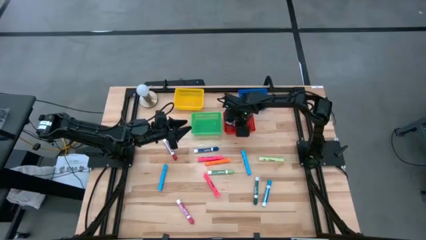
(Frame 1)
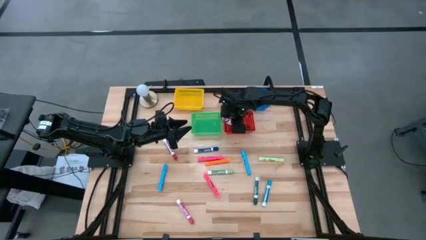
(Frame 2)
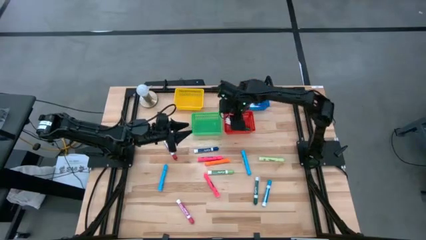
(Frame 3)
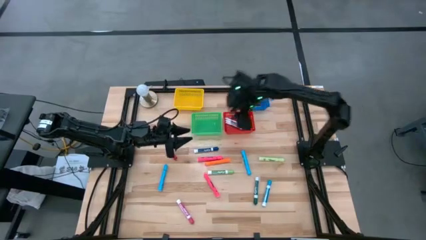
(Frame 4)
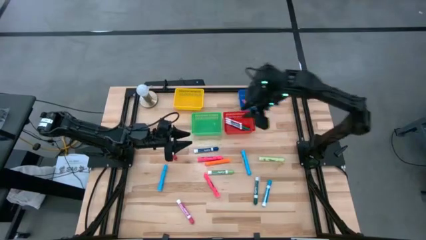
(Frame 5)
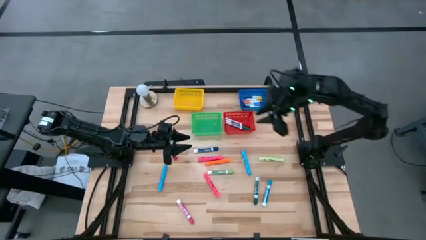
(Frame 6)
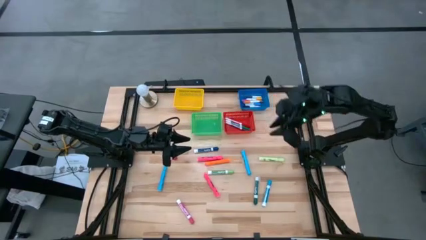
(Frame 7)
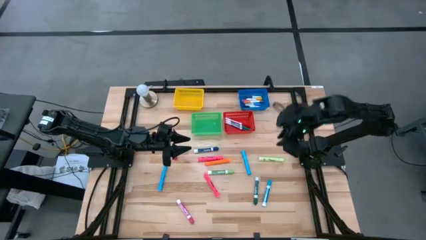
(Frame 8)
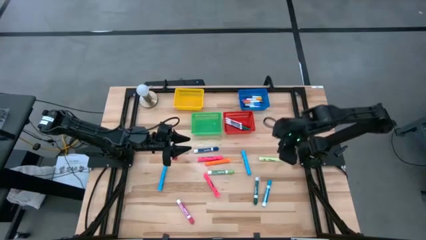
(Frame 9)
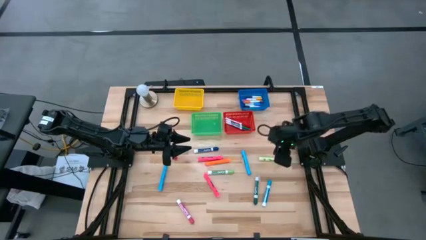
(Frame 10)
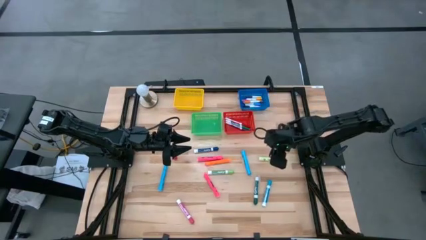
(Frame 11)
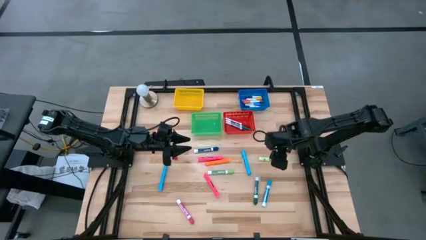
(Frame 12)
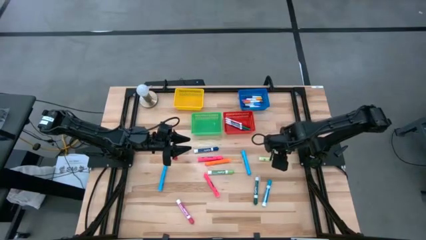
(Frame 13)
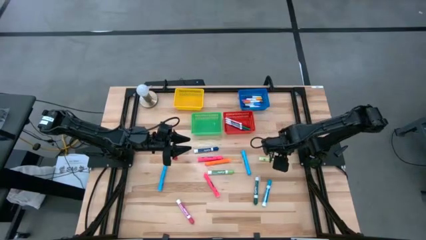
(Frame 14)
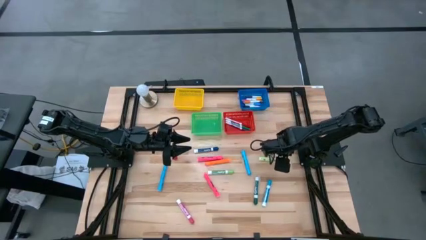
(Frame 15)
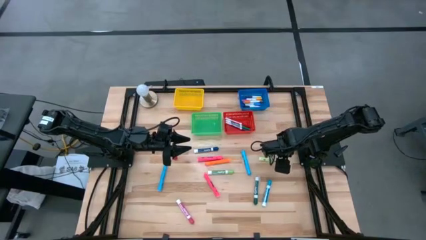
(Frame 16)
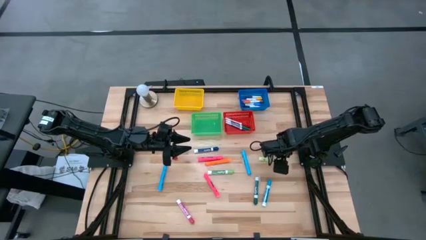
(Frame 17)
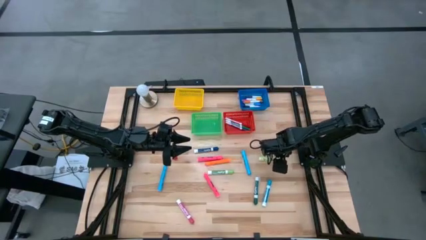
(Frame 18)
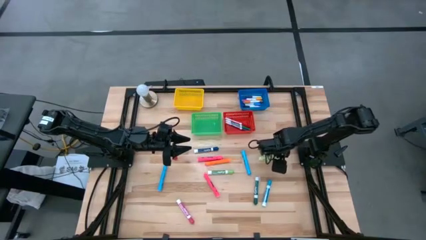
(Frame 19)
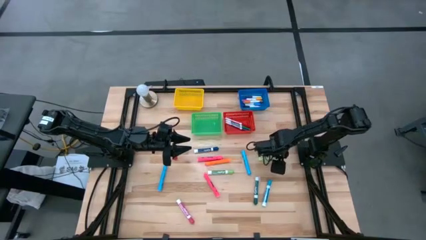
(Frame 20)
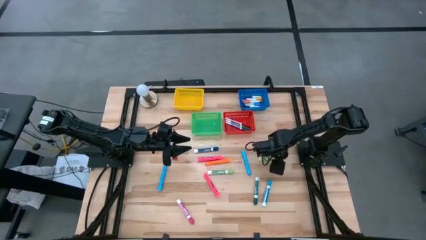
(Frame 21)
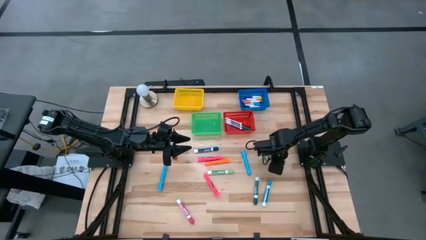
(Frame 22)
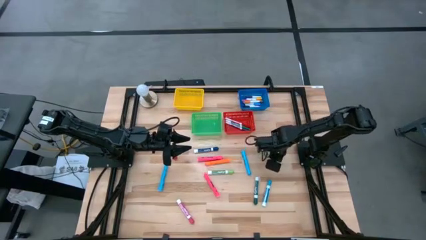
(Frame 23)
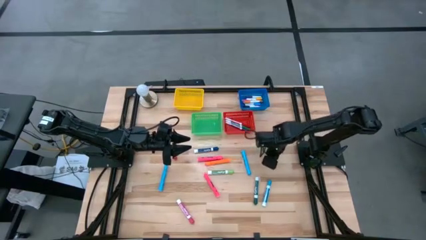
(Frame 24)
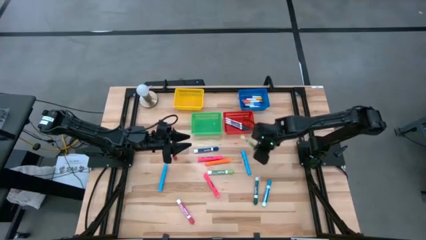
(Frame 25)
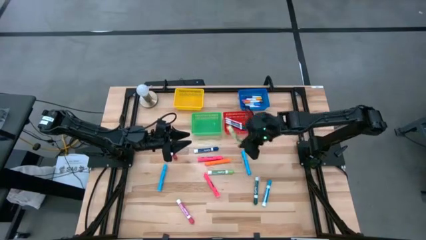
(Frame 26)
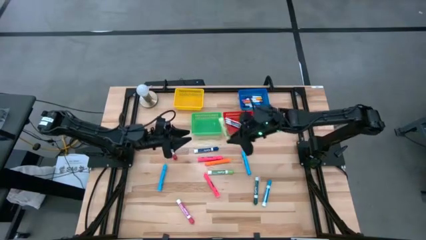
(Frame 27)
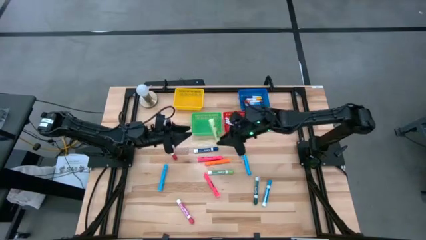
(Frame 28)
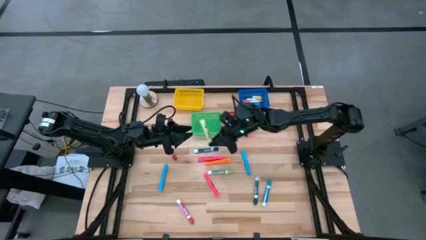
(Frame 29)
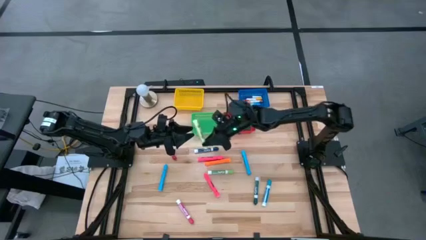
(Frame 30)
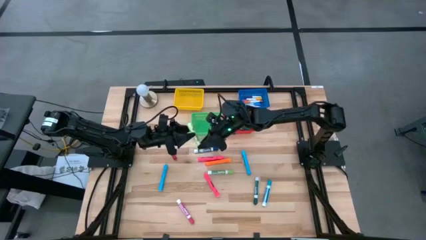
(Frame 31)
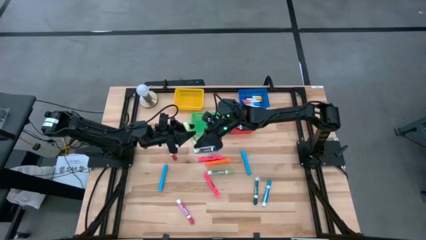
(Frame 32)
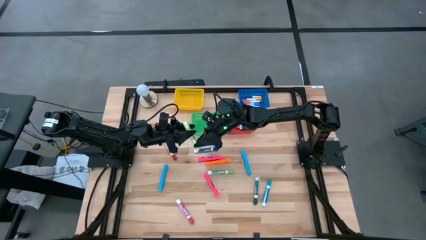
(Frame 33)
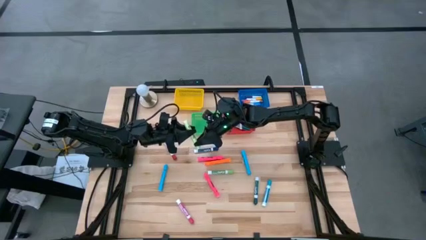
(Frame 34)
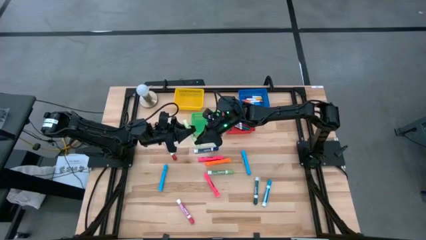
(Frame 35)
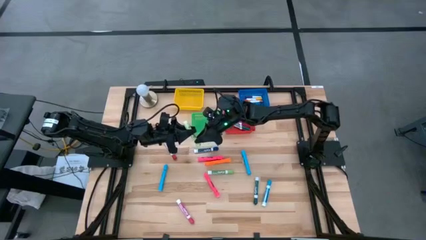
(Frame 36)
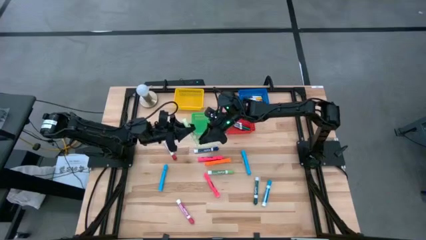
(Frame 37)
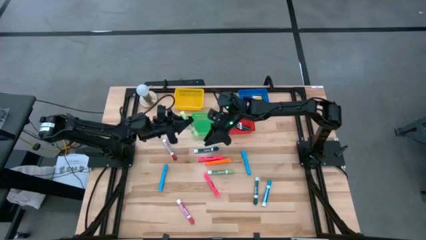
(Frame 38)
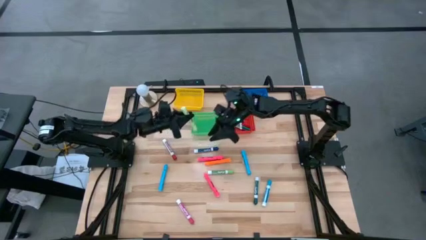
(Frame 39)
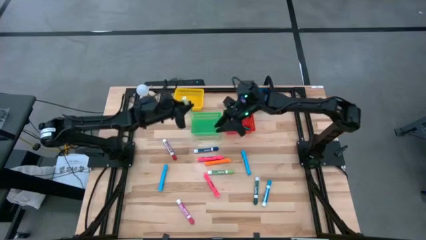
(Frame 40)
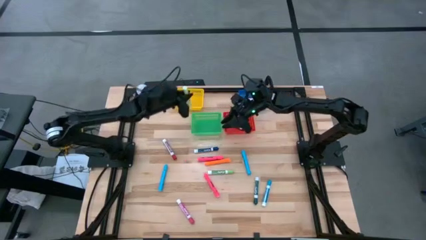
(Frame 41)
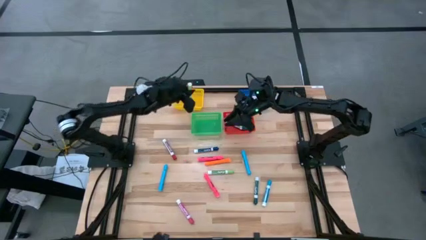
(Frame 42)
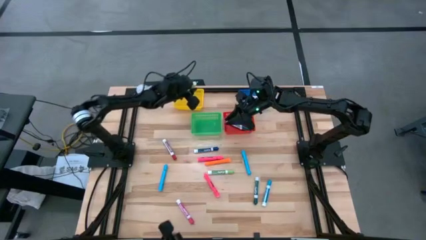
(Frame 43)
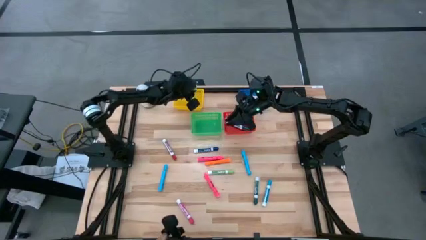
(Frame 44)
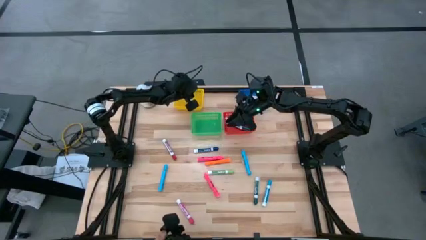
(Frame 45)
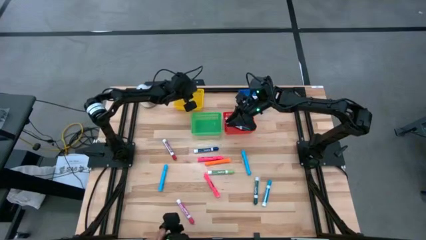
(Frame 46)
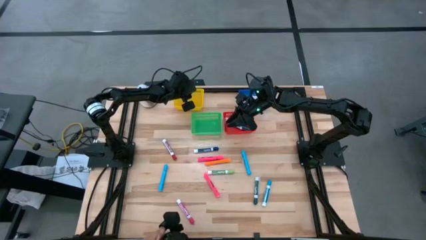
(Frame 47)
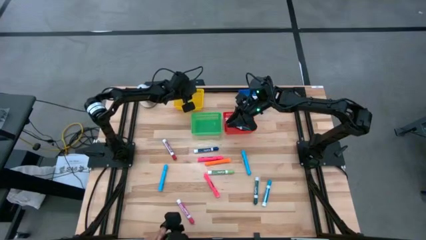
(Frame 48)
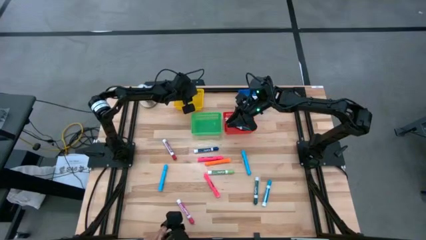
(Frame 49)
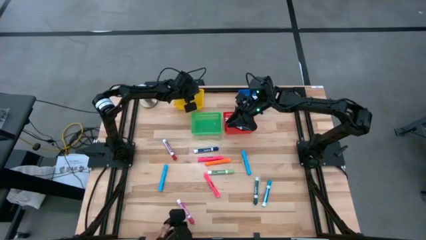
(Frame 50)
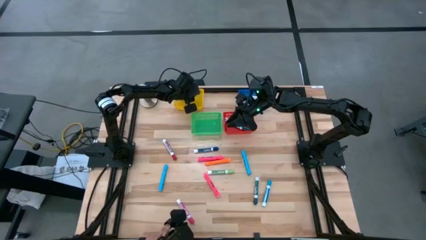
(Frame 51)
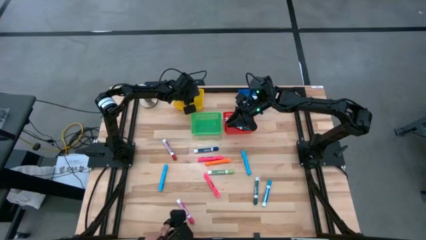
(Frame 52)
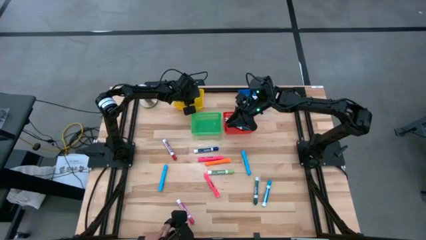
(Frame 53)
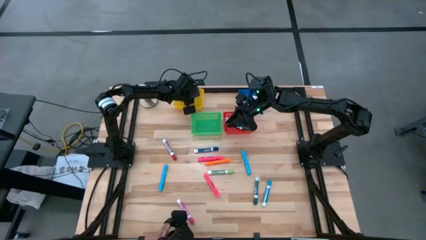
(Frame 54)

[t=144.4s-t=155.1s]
Task: Pick & Place Markers
Put the light green highlighter into the yellow bin

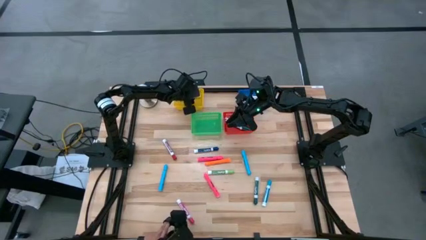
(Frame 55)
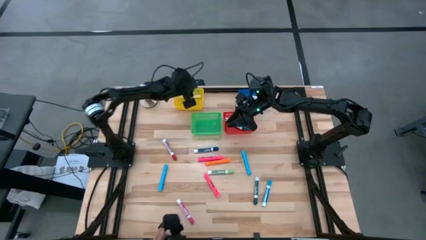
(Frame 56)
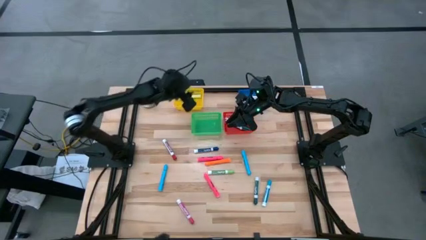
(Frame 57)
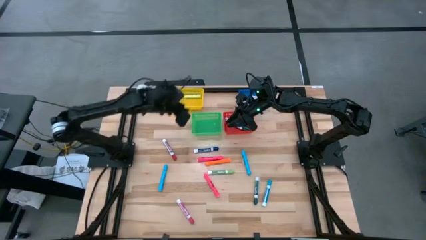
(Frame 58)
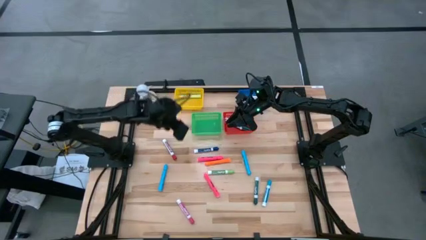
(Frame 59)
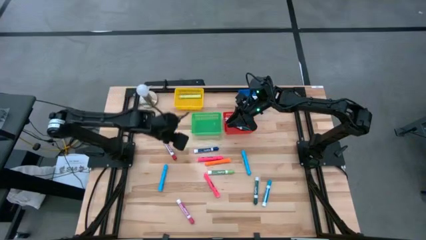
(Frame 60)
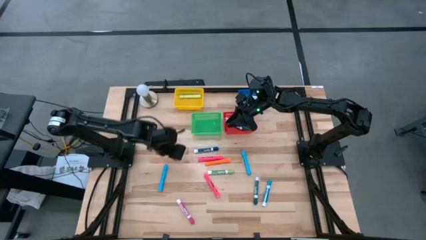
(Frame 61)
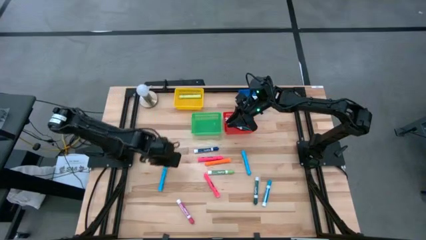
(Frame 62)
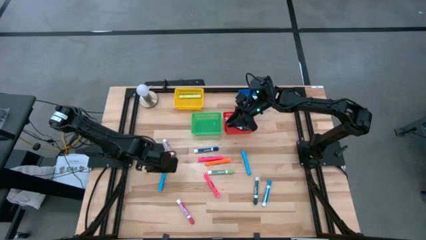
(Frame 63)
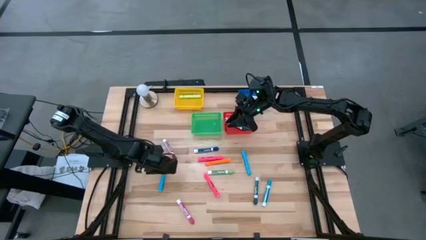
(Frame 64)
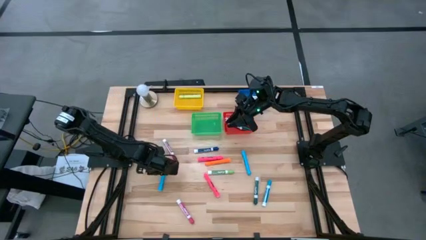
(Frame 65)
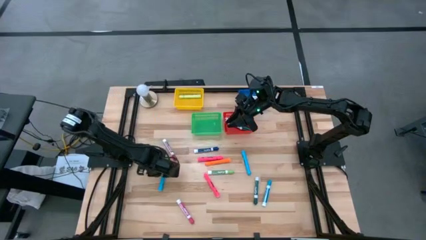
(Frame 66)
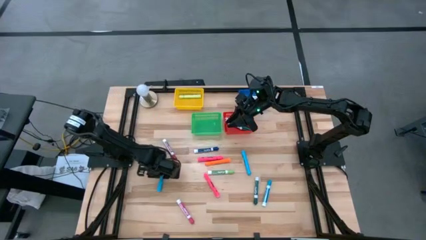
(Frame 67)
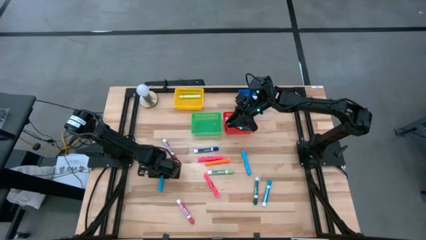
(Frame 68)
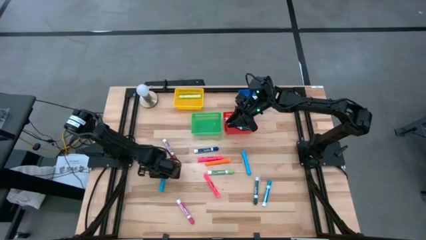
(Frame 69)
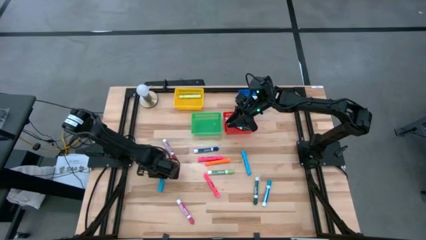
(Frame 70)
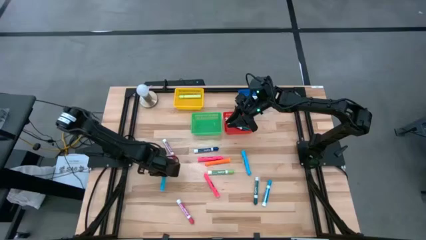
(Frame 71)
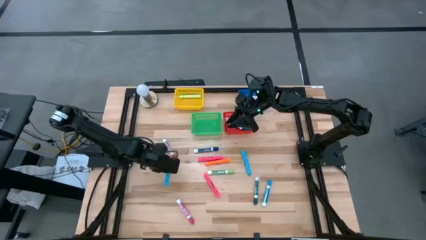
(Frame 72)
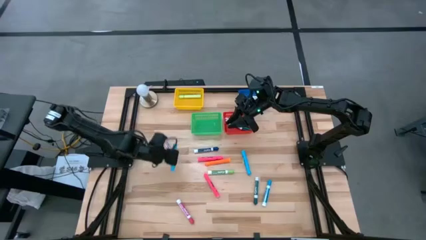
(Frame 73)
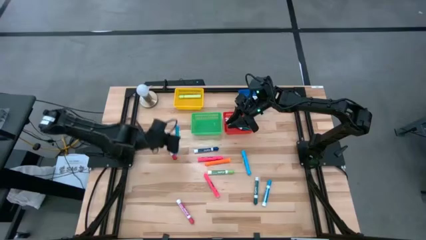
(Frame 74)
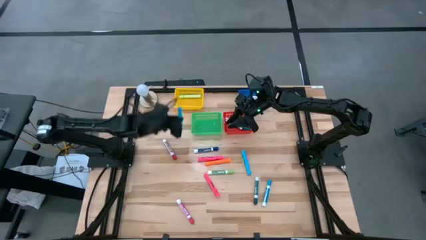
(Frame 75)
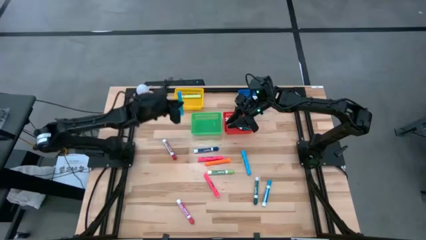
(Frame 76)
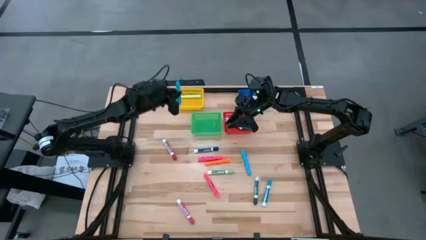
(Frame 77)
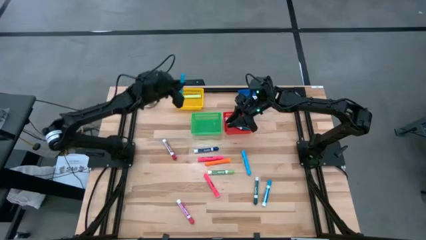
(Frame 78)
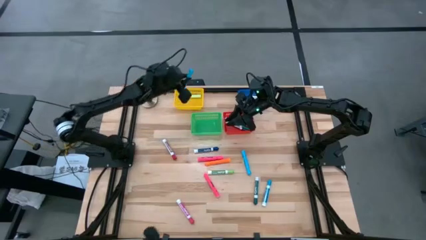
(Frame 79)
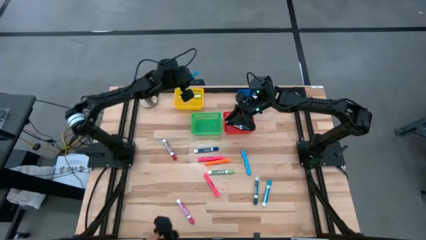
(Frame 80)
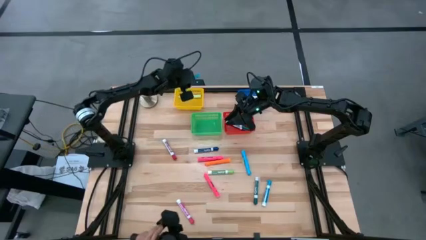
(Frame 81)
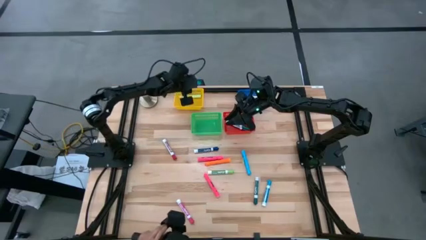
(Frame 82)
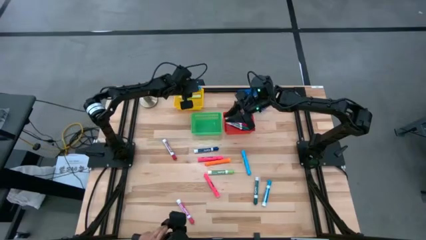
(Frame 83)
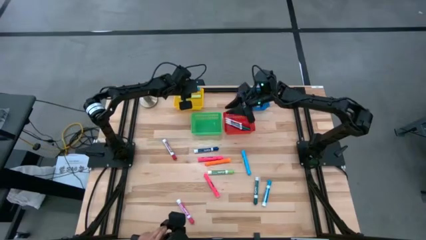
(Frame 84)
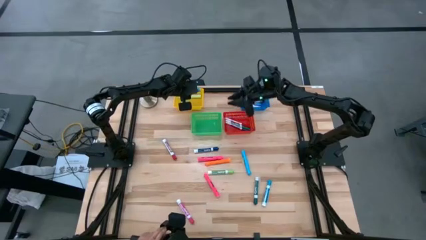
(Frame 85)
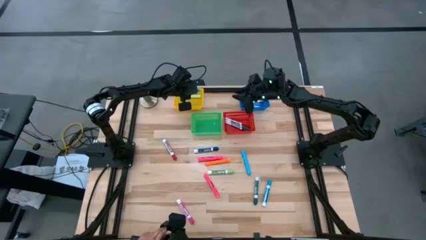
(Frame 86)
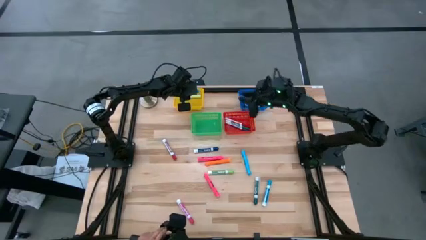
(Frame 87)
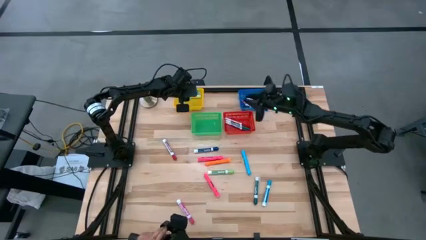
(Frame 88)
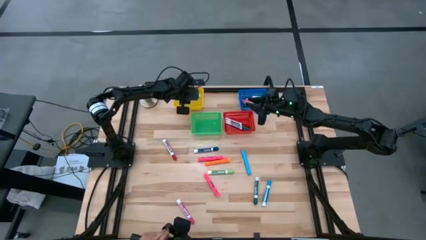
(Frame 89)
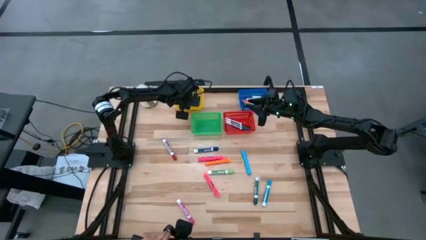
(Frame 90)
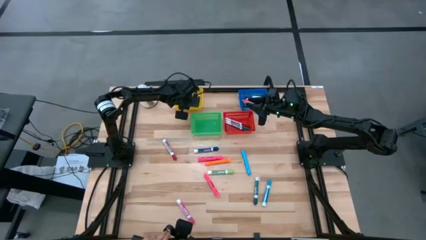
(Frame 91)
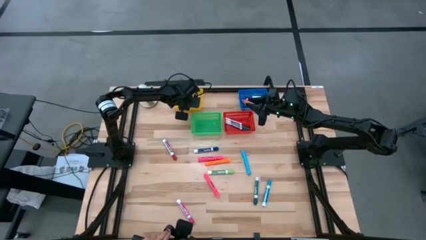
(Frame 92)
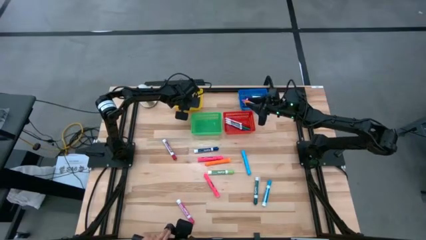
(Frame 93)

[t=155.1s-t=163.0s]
Put the blue highlighter into the yellow bin
